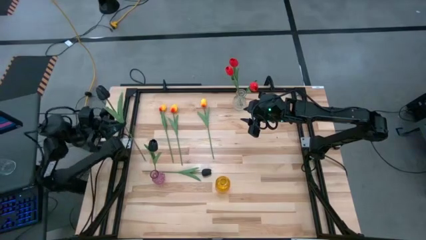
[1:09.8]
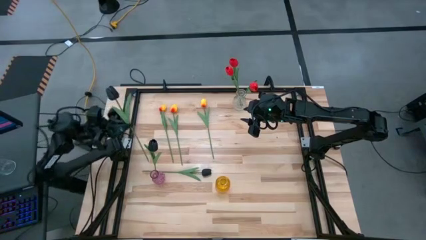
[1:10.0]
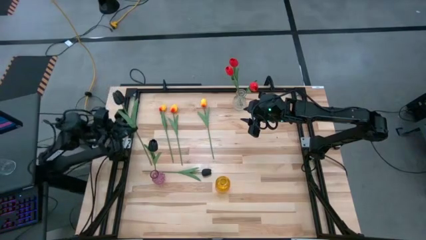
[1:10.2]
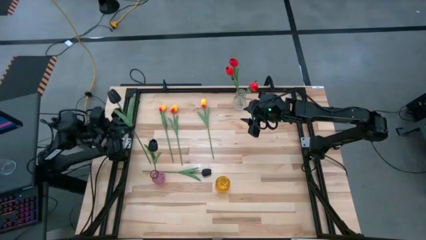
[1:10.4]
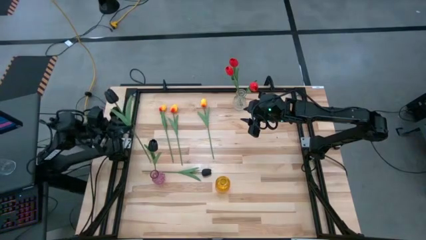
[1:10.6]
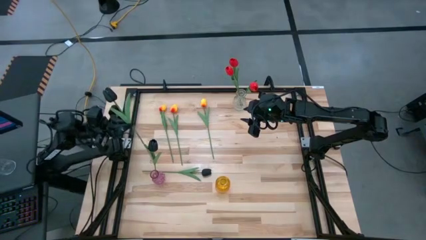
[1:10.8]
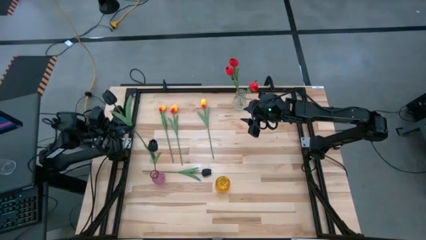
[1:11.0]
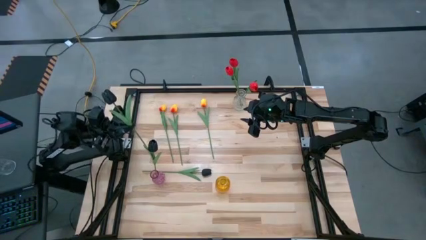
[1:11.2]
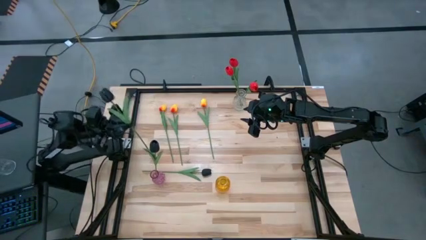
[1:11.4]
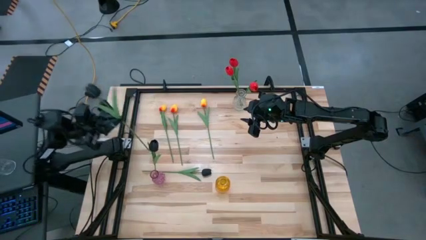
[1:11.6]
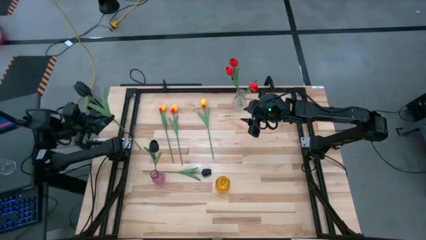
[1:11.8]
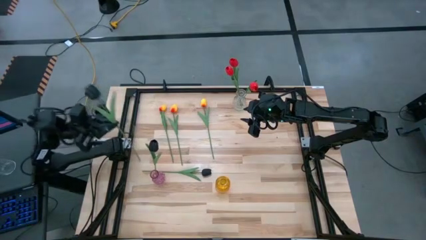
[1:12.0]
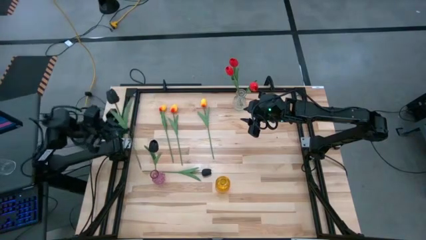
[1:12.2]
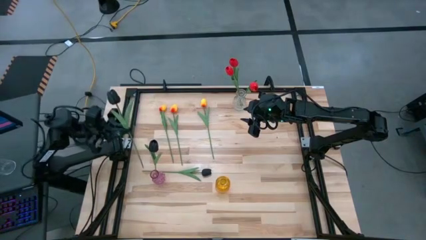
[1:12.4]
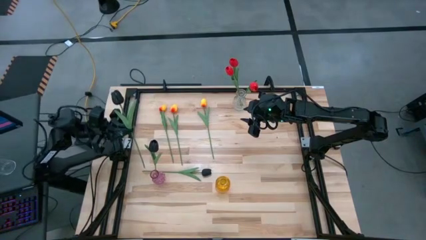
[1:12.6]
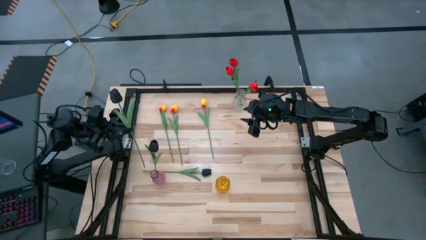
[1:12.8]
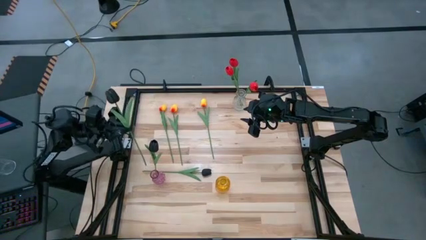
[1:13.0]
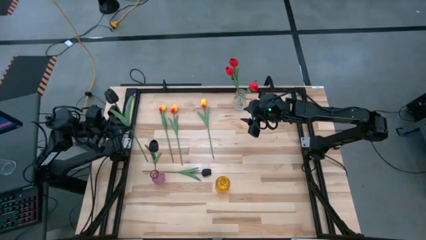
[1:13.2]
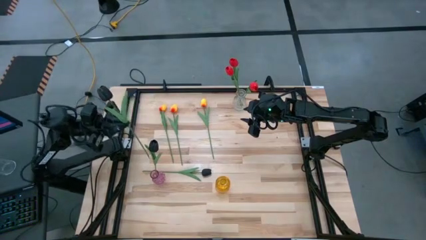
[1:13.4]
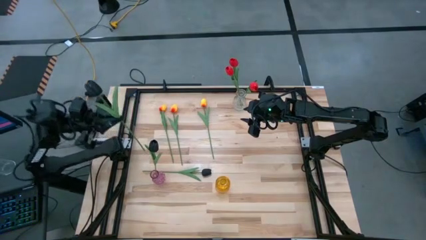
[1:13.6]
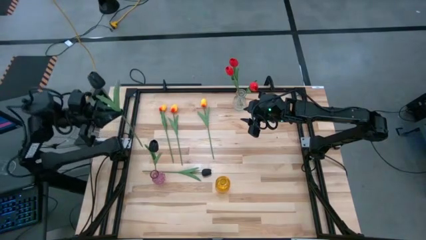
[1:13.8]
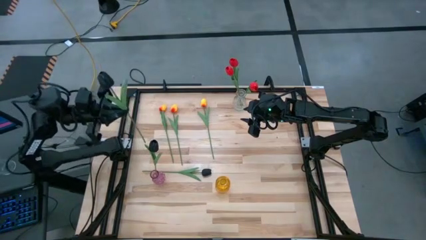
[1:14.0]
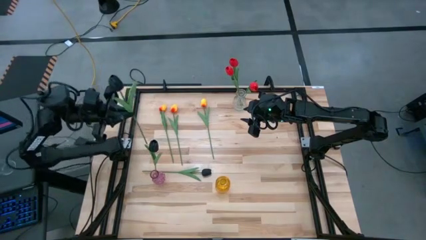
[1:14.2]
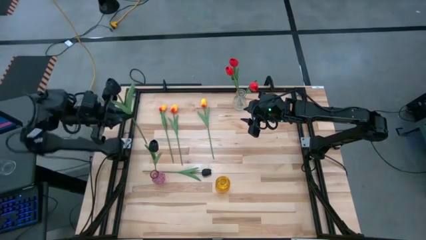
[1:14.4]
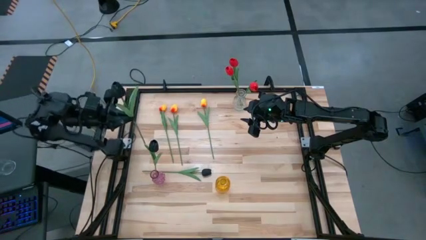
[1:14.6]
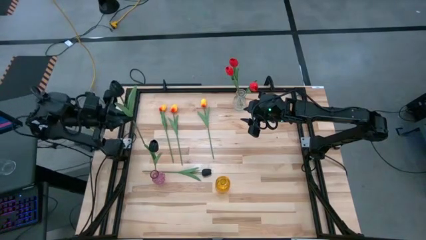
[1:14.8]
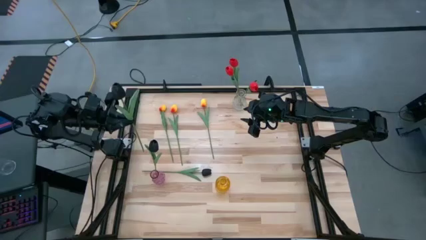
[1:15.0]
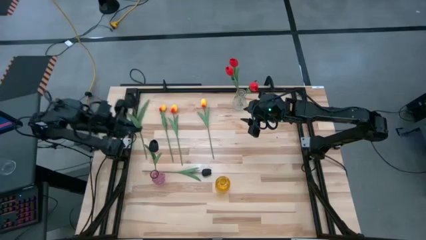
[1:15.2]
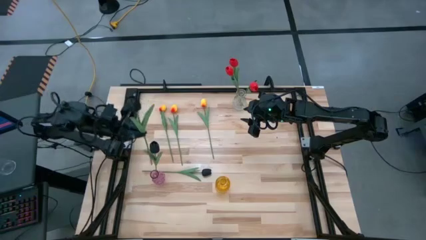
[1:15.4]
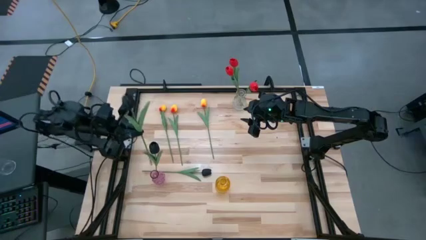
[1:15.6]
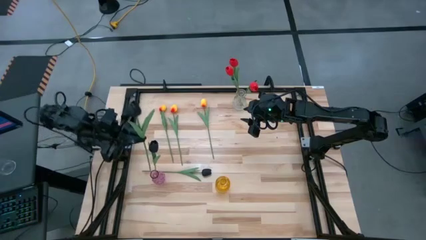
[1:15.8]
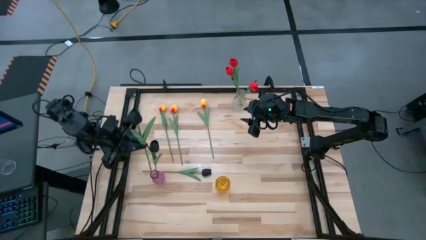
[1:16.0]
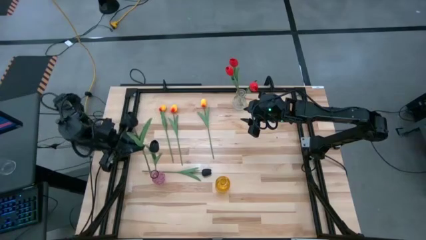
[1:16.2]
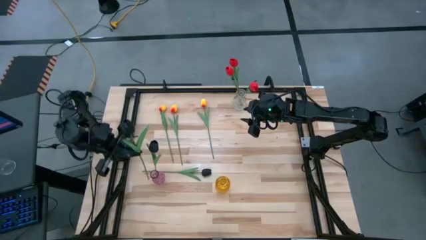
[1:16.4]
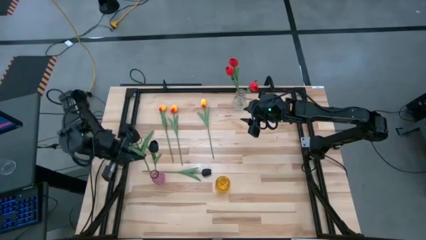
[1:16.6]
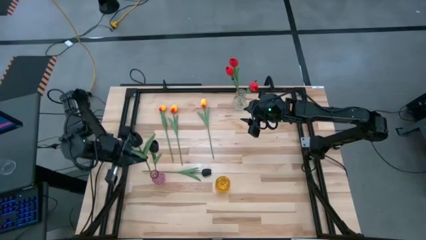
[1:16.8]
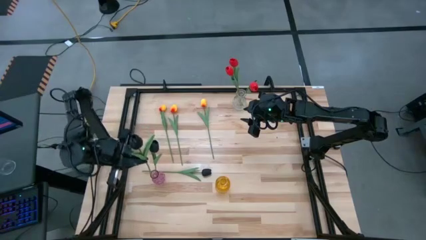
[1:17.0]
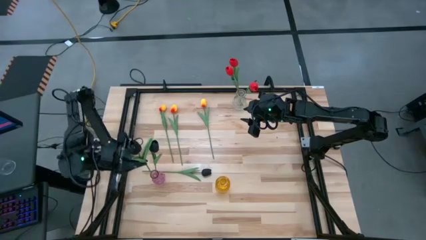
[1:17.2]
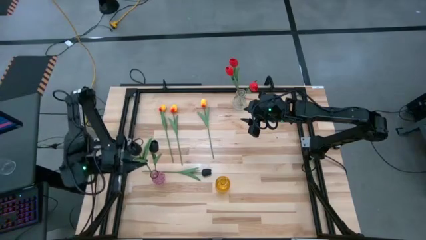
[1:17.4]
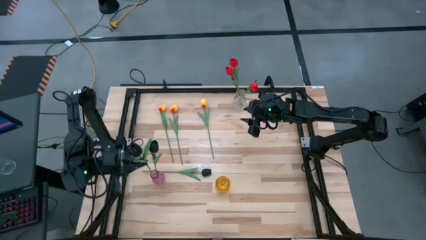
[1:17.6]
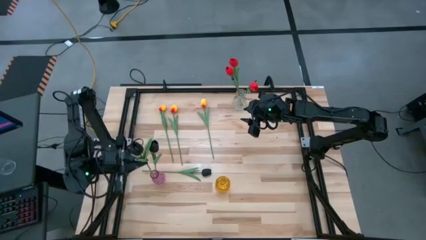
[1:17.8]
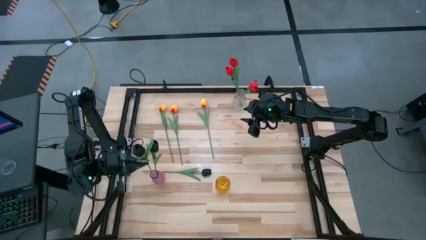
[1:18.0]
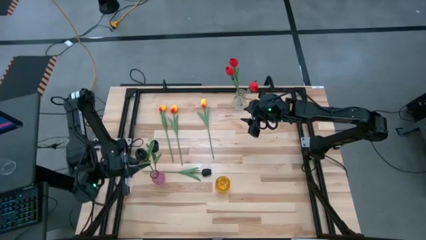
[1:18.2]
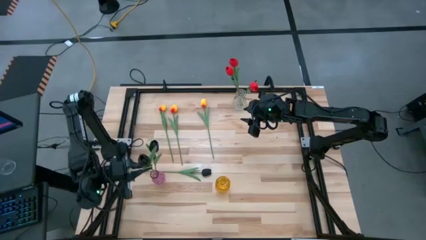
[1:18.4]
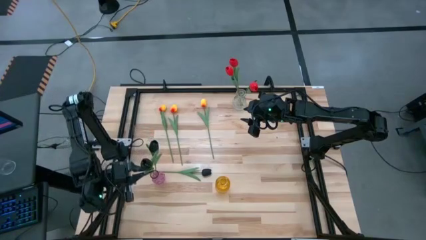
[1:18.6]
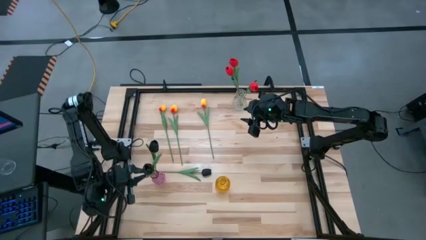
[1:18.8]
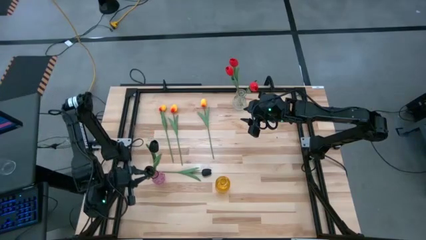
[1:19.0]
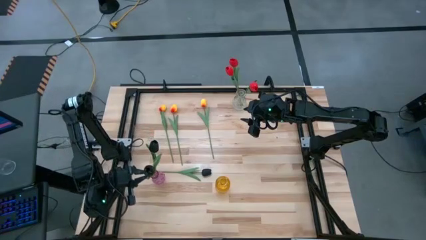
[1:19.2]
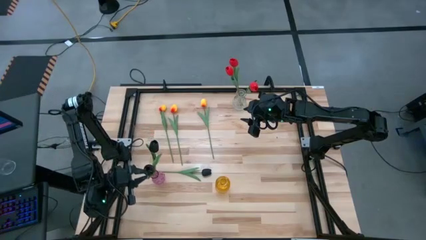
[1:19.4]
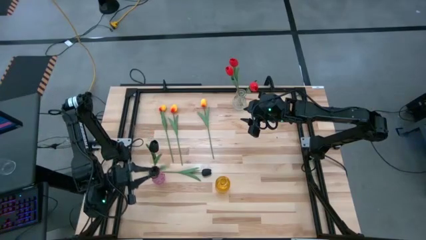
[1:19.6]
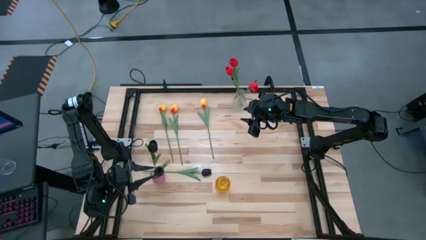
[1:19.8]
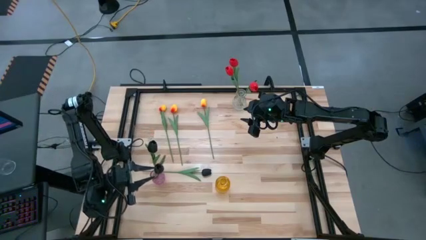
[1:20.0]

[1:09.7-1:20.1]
Task: Sort flowers into vase by color
Put the top black flower into the purple vase

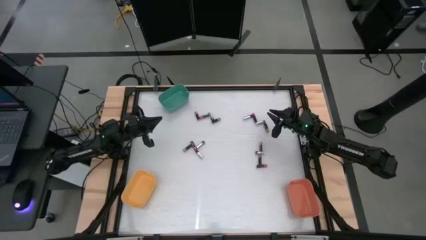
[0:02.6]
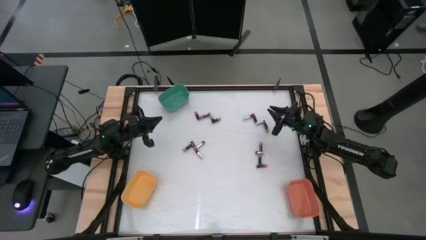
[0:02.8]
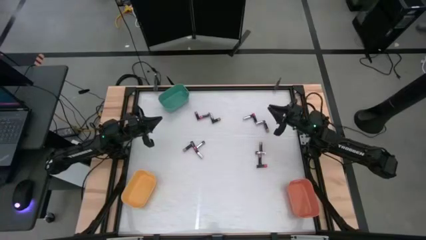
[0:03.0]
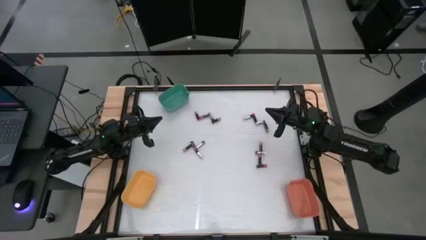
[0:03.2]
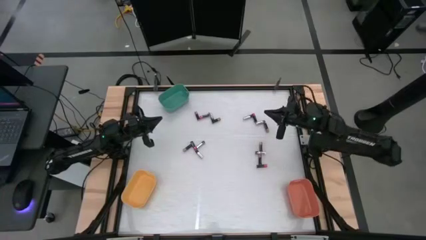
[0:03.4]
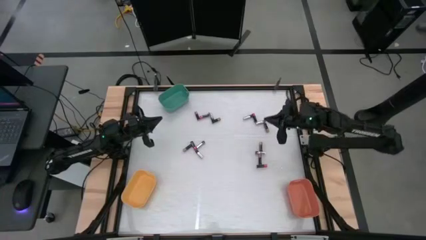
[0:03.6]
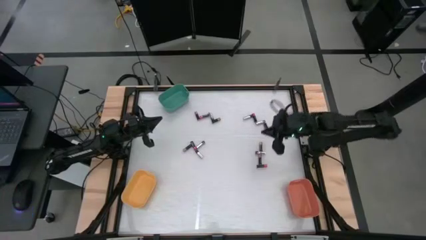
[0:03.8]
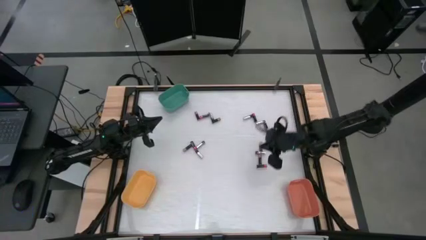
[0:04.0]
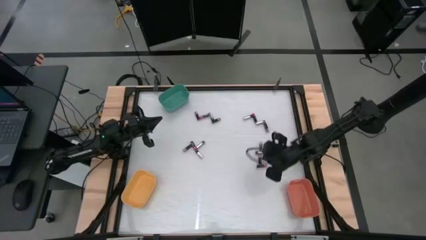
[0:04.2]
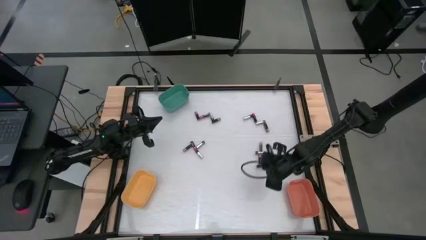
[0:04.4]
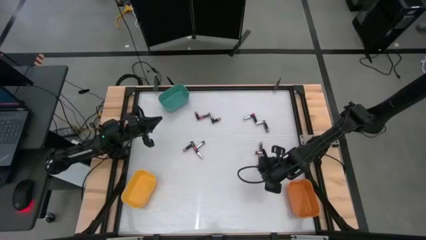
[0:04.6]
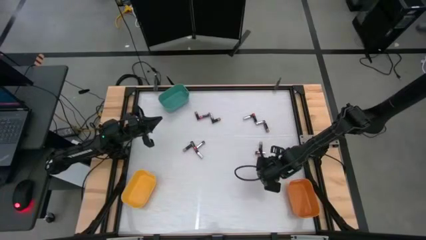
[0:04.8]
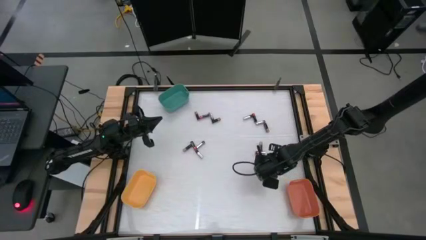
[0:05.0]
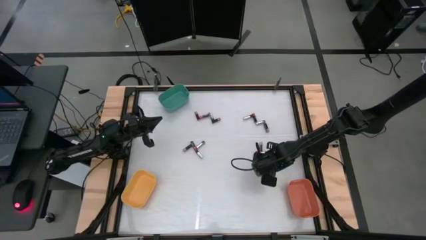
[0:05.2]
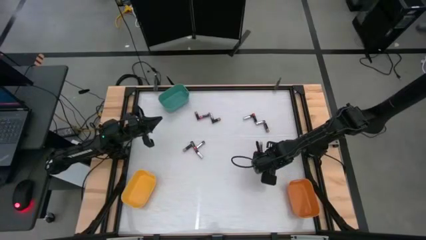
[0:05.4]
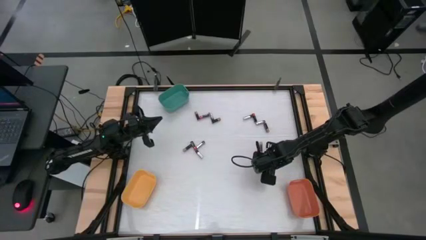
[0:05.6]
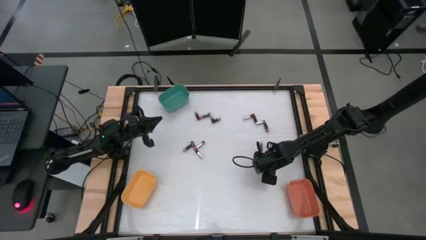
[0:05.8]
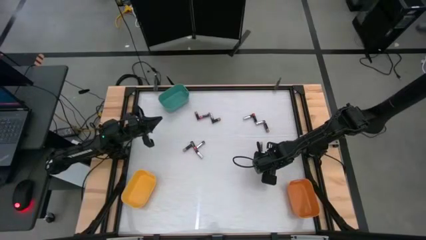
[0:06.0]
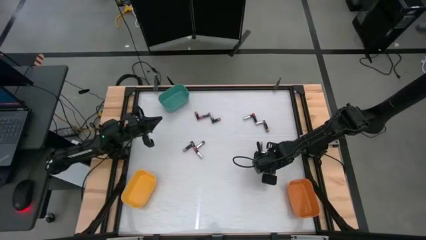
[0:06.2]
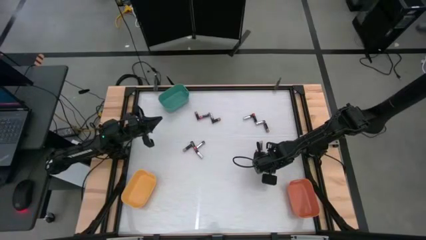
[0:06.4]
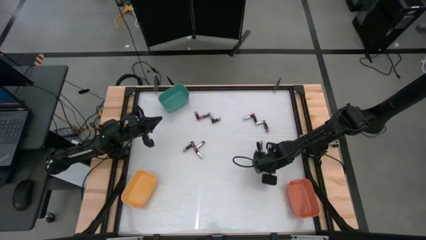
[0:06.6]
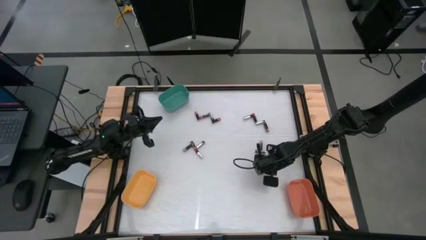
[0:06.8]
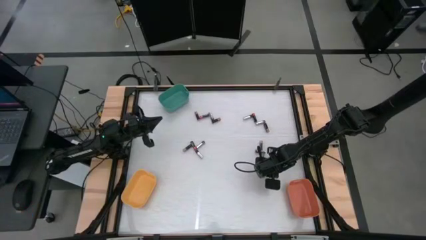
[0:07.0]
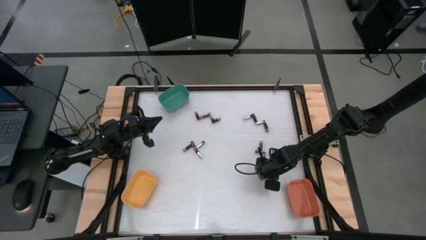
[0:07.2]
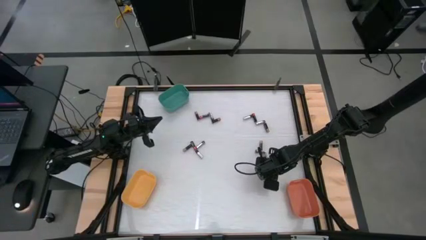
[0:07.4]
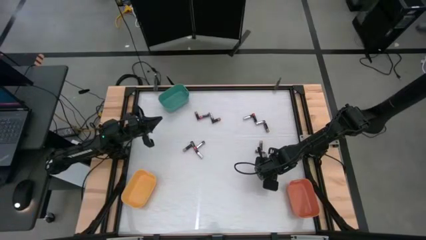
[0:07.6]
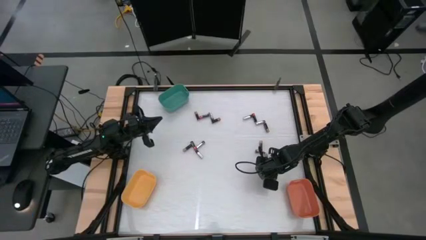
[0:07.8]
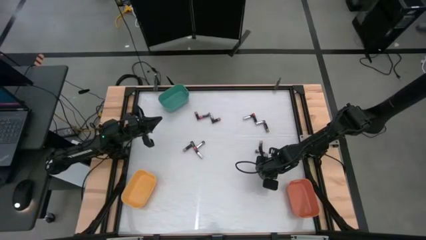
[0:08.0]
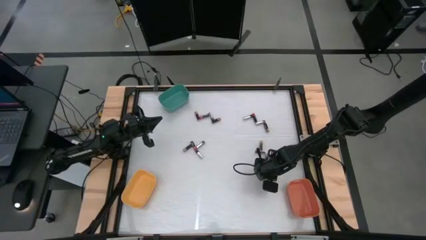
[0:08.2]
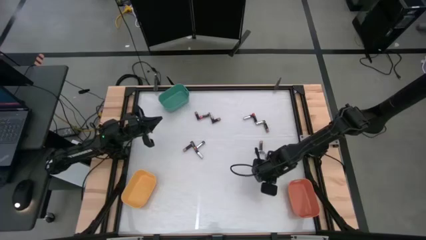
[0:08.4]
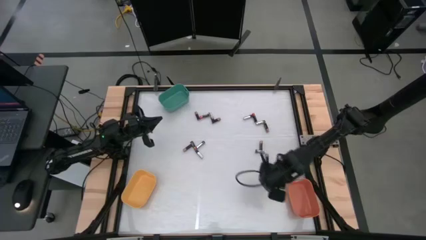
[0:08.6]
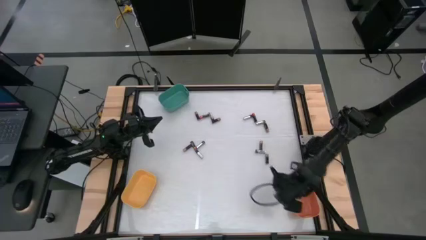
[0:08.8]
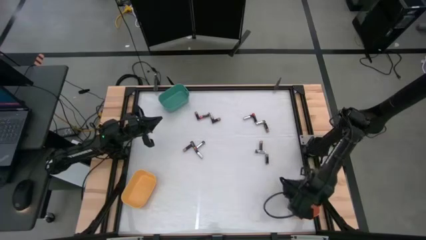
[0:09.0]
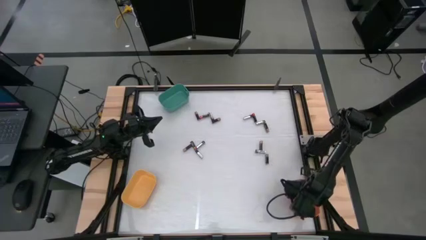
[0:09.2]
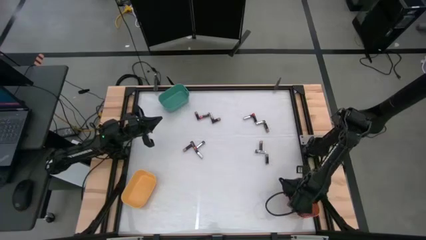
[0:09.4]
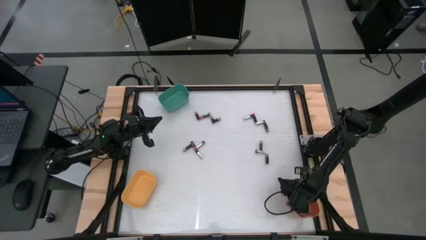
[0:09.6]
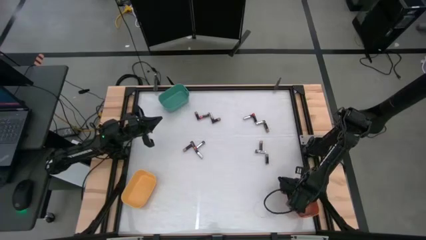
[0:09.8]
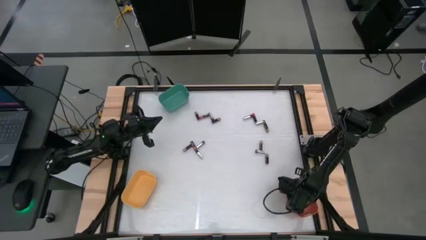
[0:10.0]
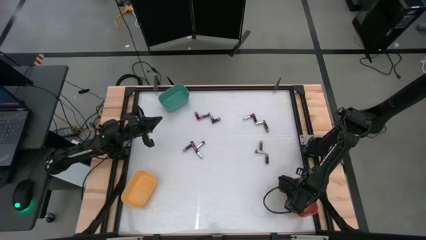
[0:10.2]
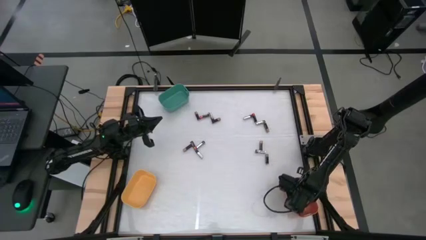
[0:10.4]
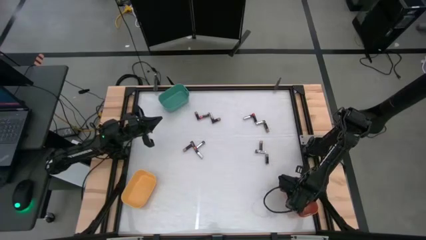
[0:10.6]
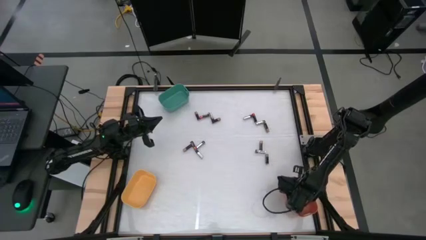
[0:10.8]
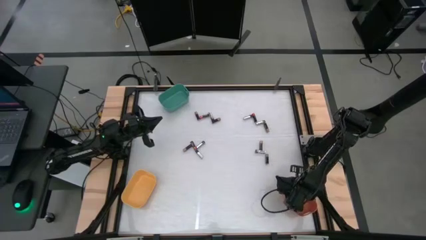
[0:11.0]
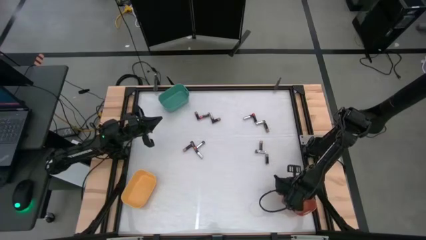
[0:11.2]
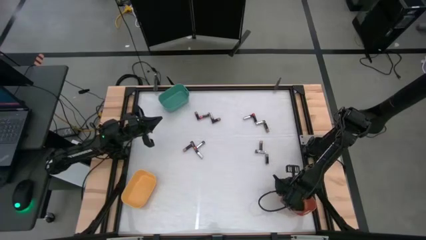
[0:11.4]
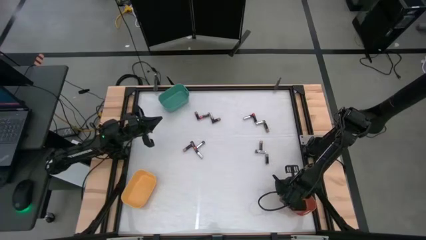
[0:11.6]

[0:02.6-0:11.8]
Task: Sort batteries
Put the red battery into the orange bin
